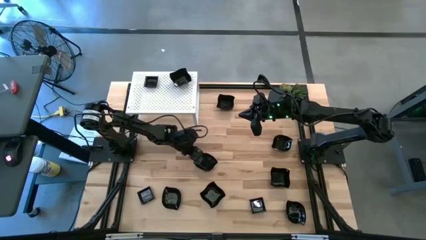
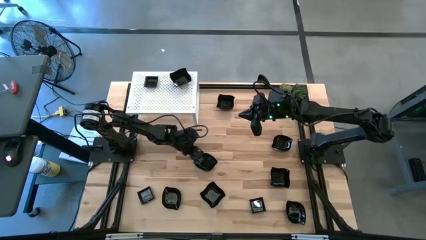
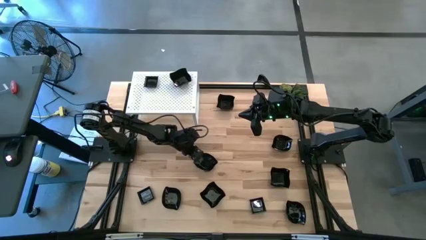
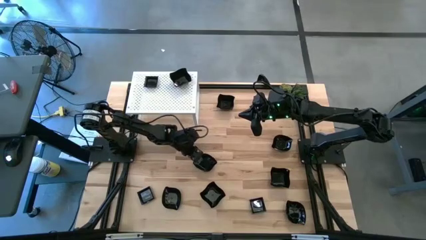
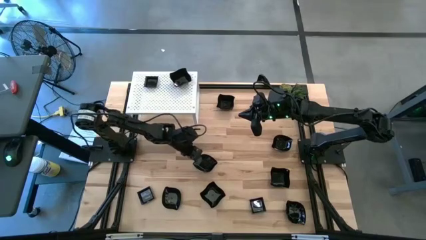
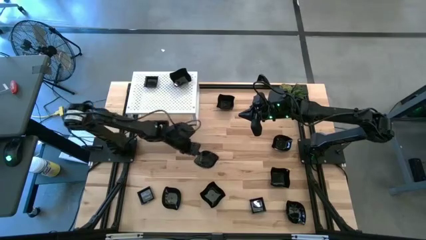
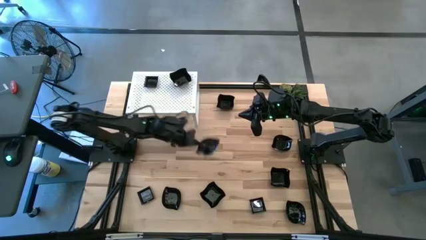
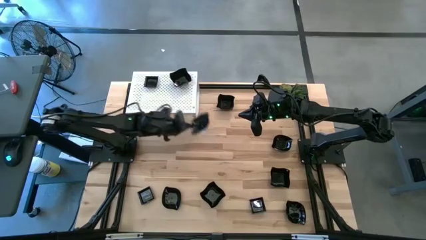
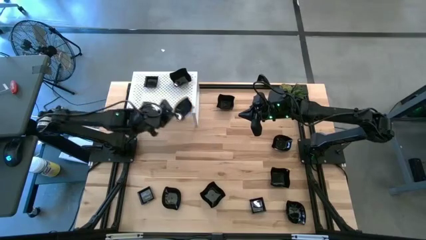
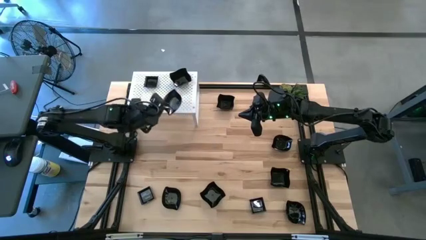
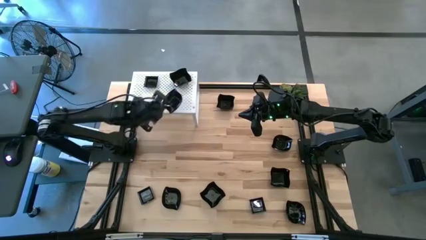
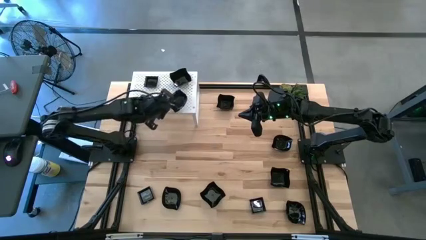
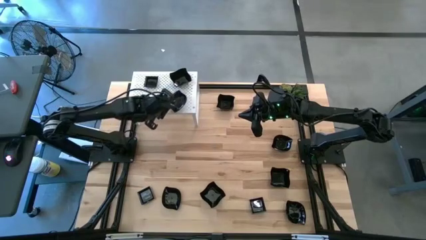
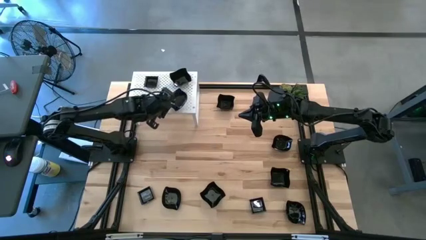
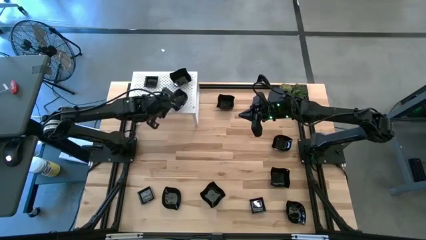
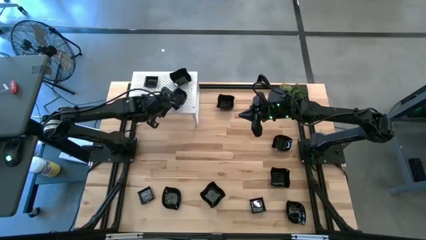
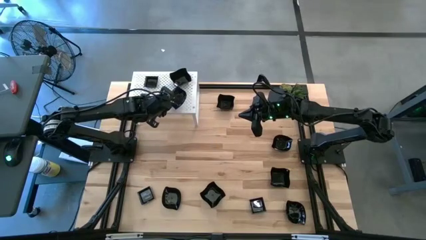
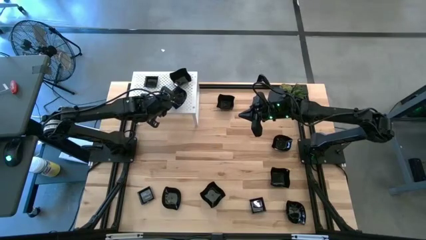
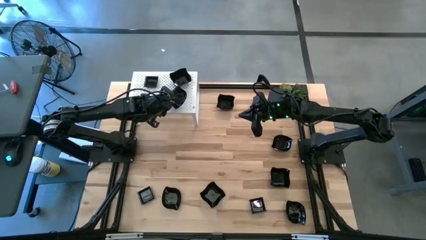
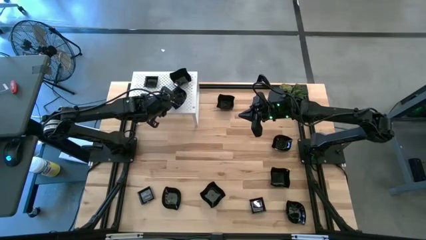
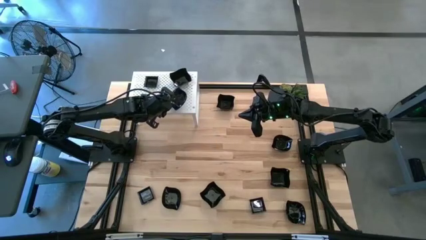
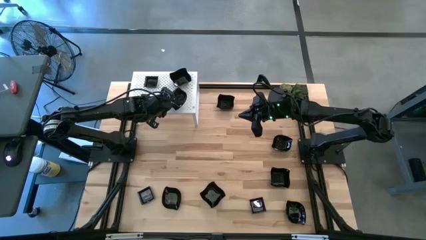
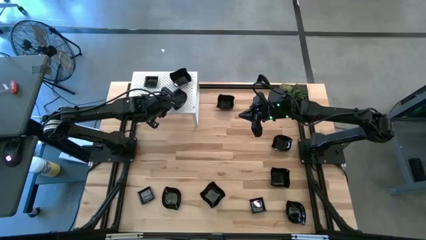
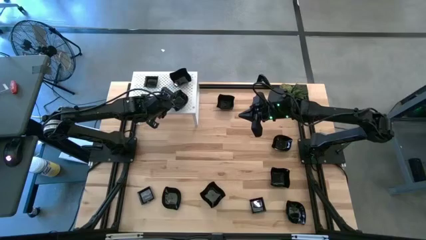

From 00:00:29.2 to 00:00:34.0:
Task: Pick & Place Mini shaped plates
Put the black leaf shaped plate on the shelf

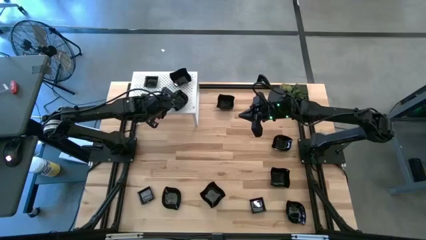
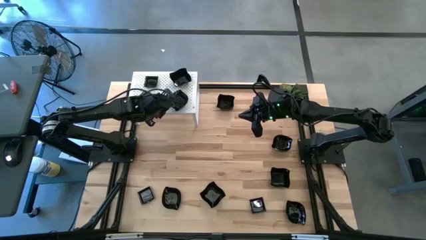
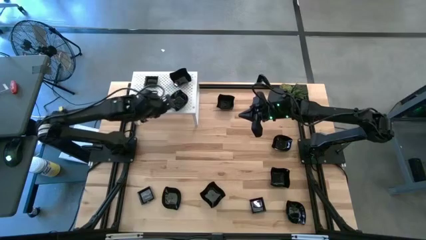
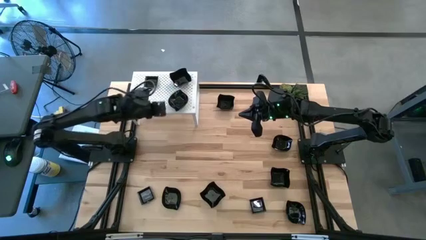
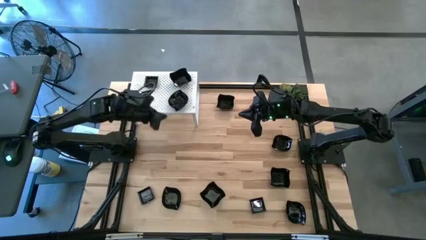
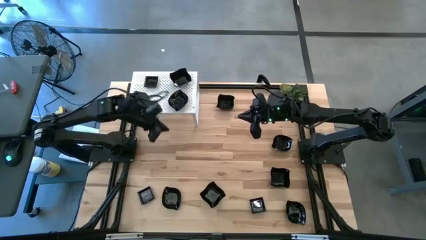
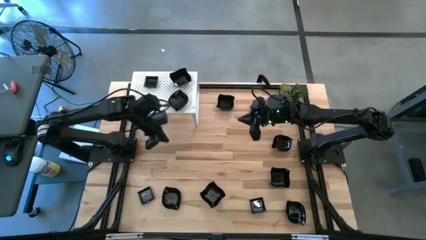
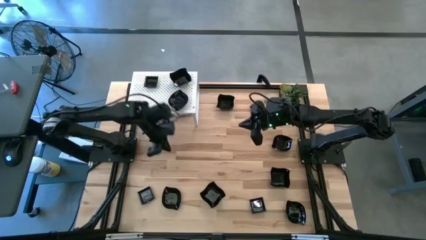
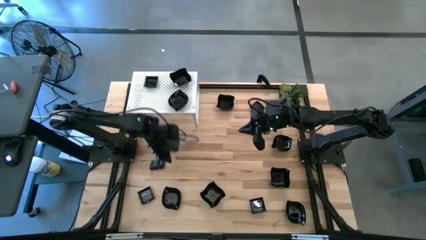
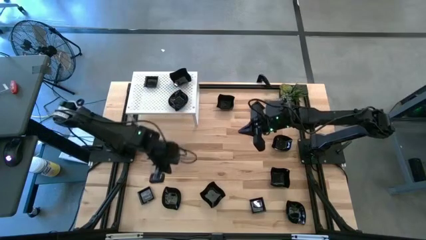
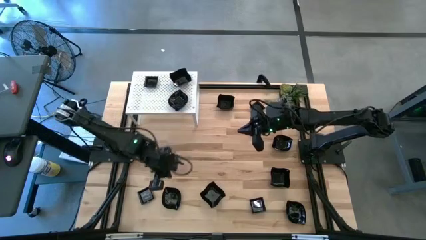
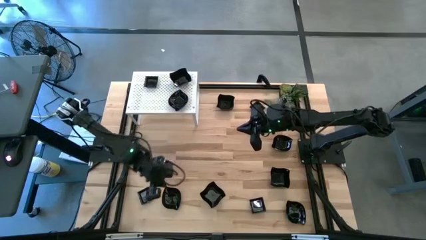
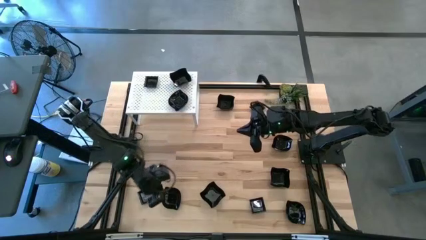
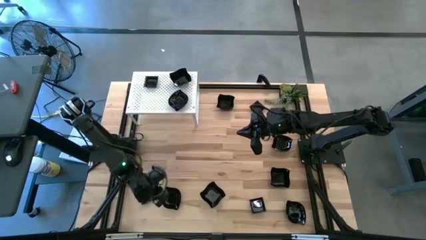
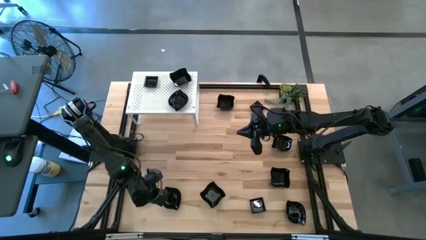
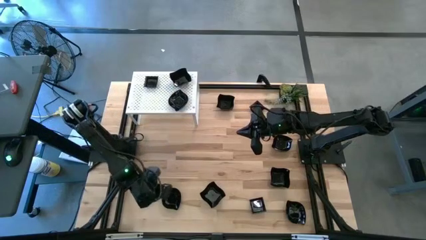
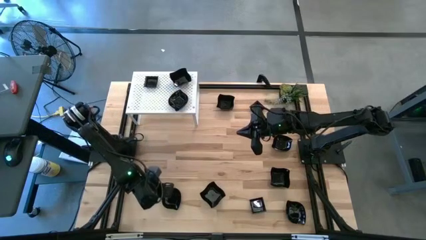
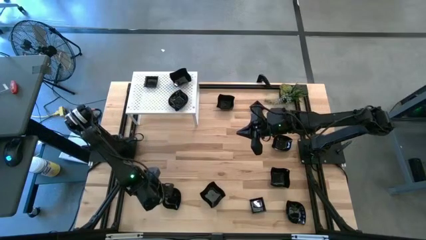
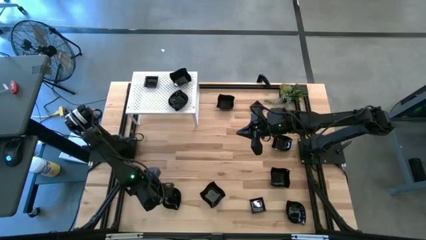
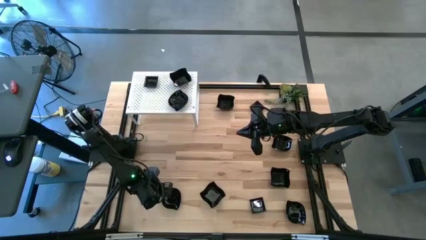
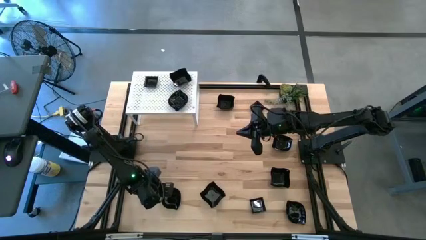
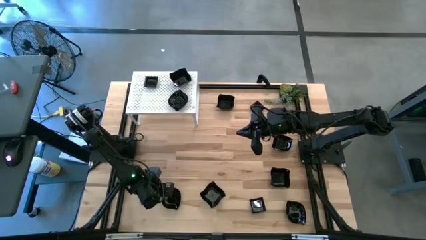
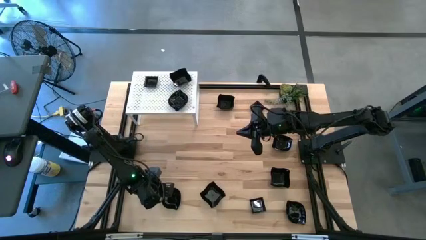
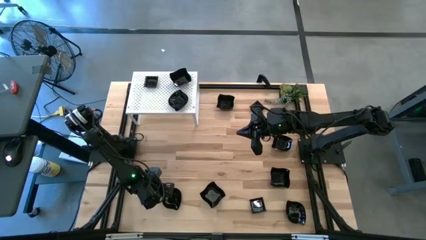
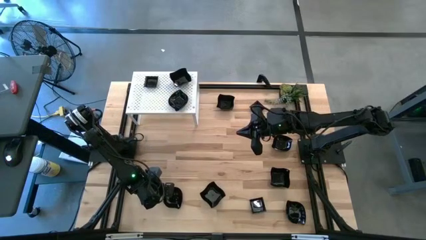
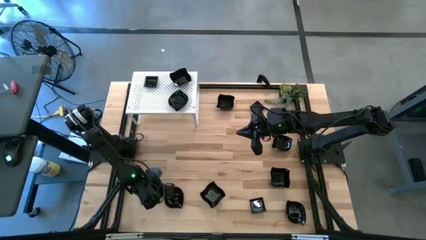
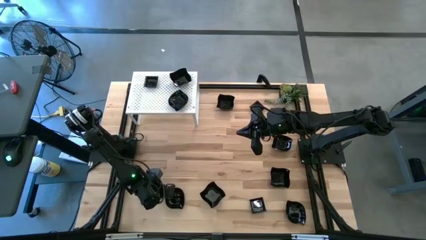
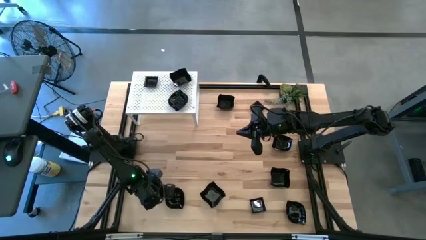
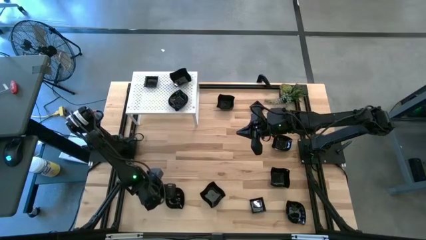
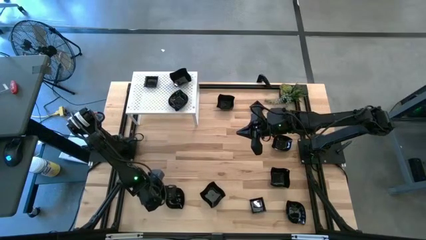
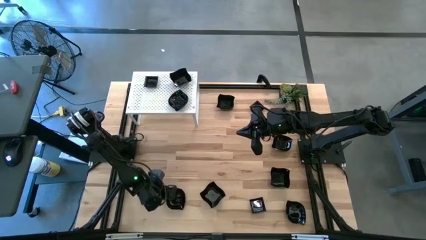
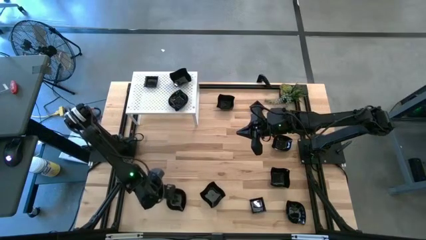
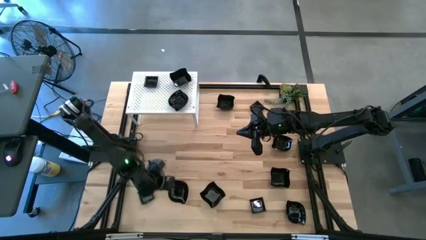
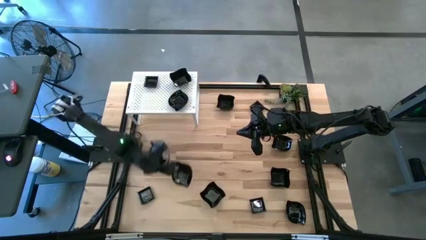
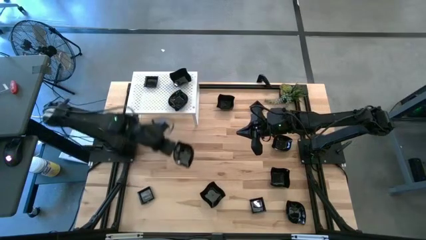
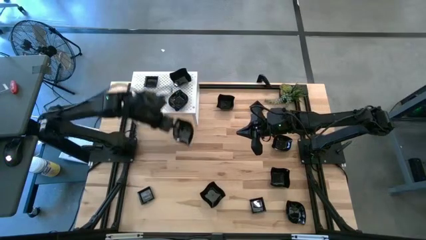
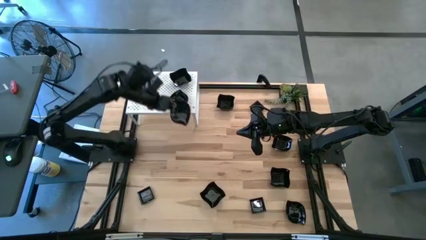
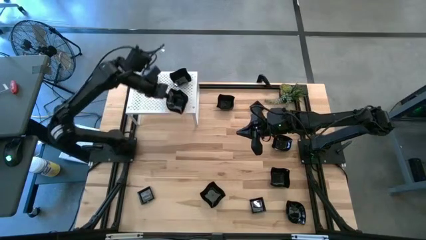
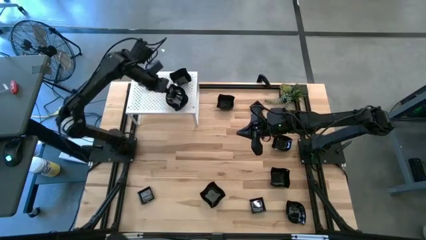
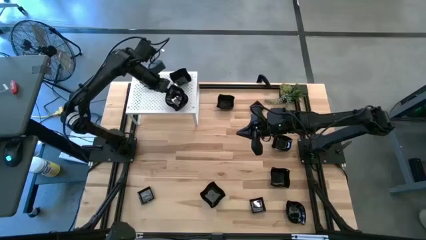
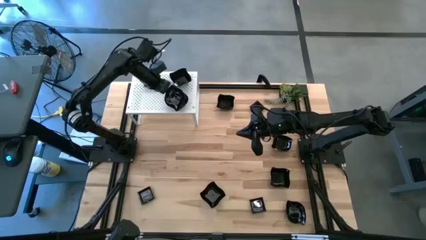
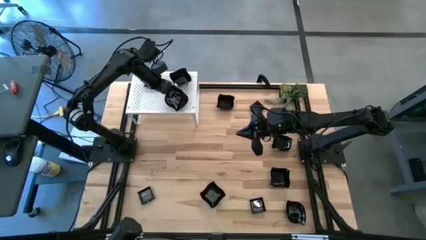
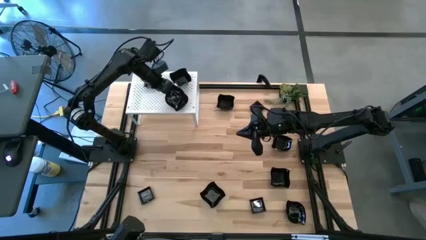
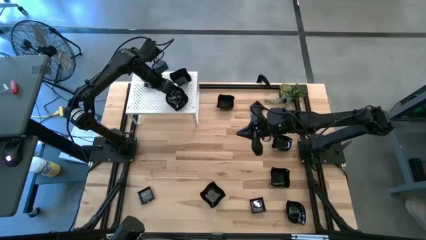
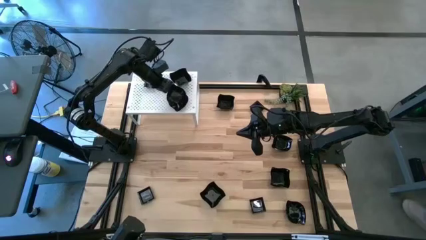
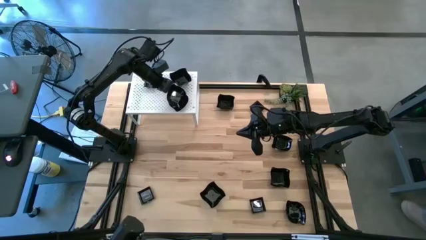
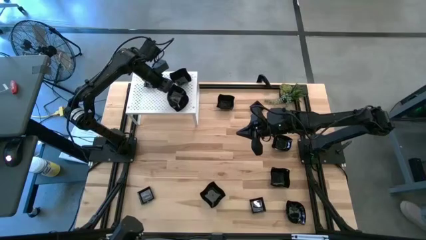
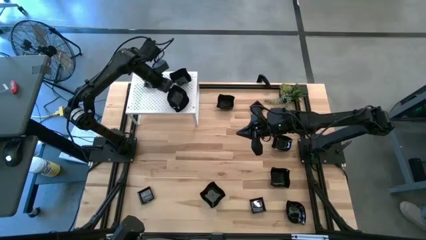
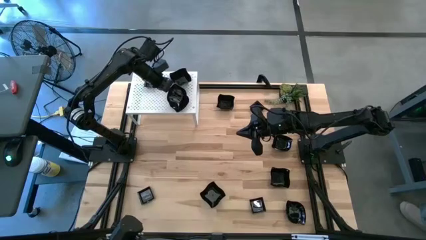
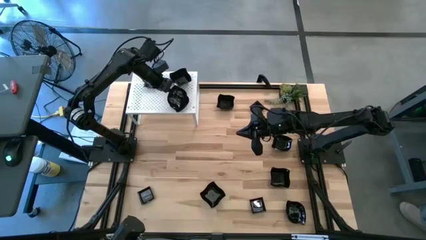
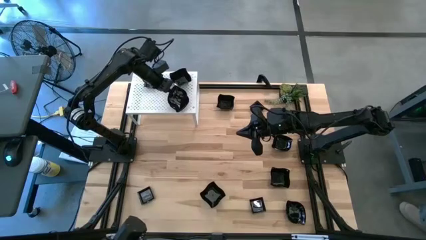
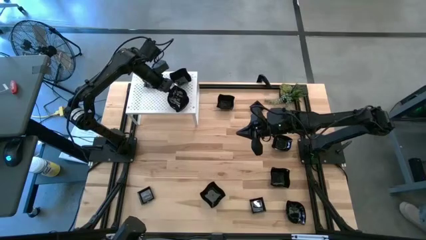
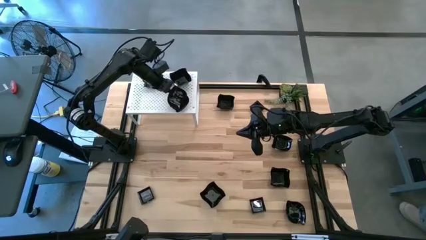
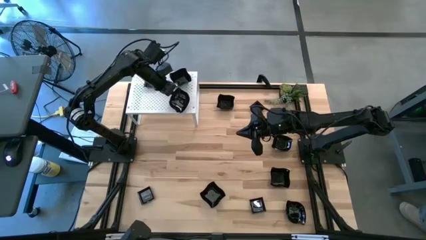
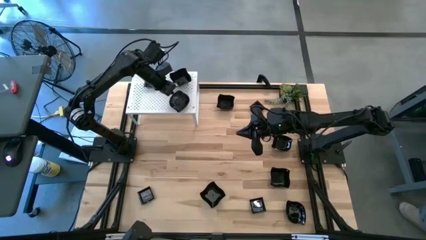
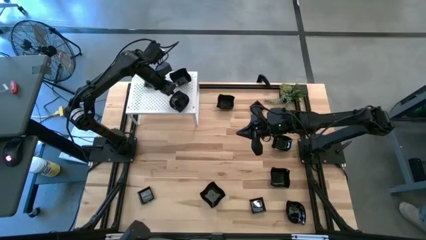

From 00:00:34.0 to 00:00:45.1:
Stack the black leaf shaped plate on top of the other black leaf shaped plate on the shelf
